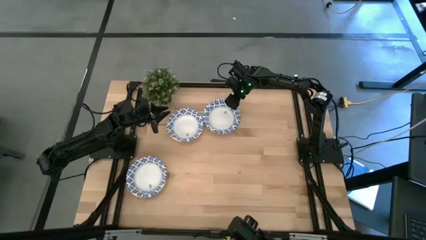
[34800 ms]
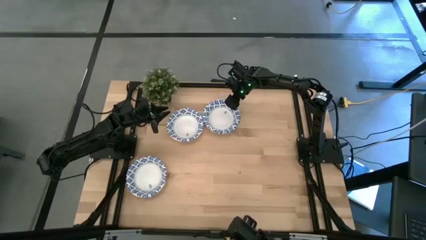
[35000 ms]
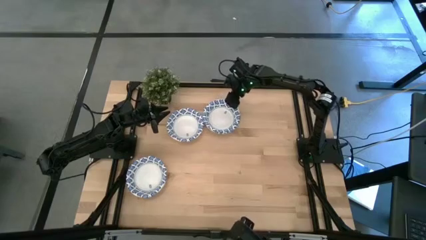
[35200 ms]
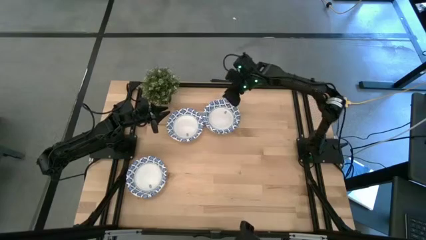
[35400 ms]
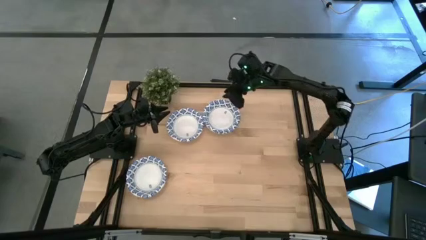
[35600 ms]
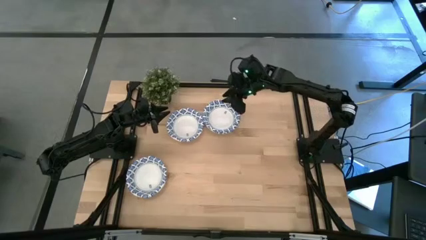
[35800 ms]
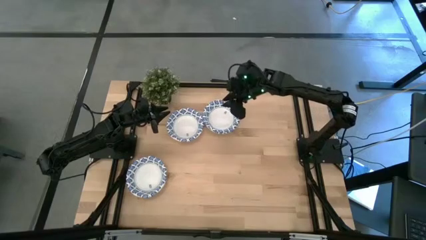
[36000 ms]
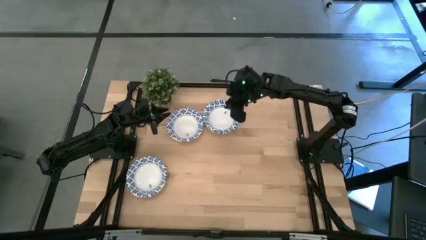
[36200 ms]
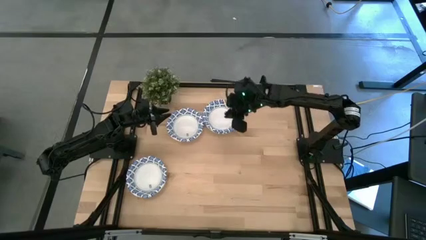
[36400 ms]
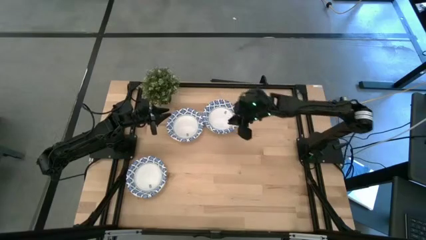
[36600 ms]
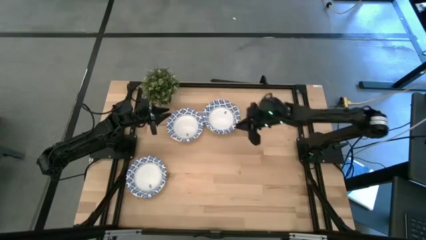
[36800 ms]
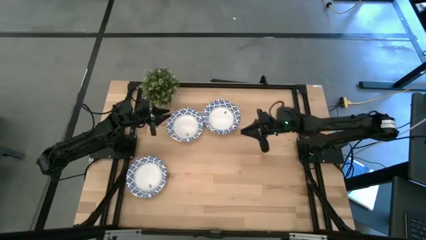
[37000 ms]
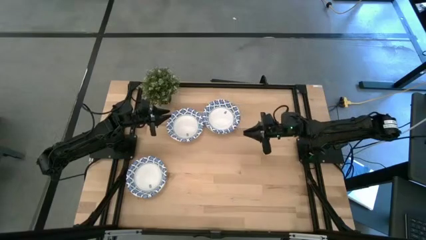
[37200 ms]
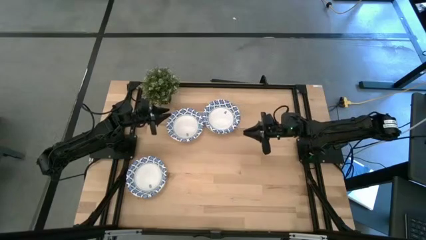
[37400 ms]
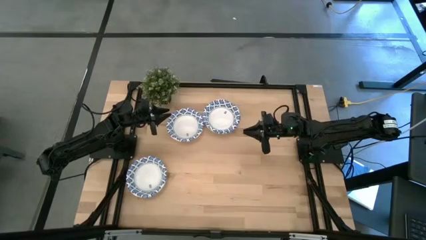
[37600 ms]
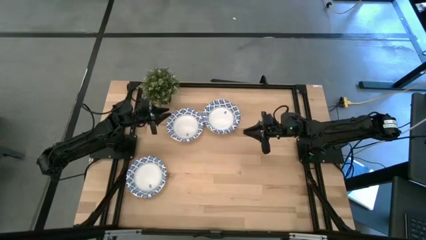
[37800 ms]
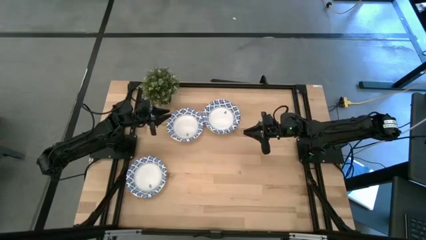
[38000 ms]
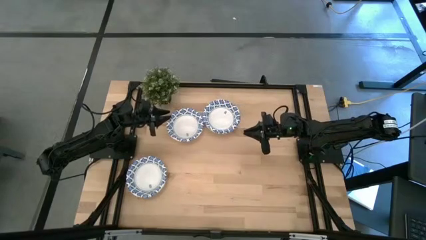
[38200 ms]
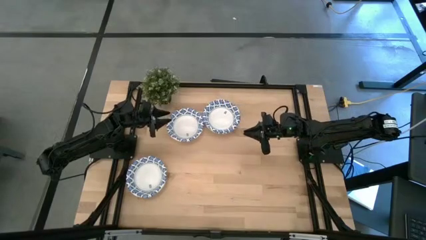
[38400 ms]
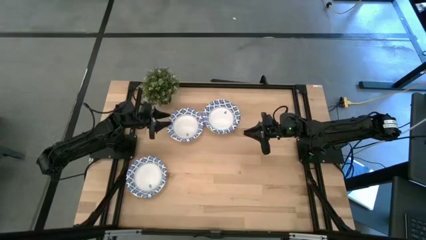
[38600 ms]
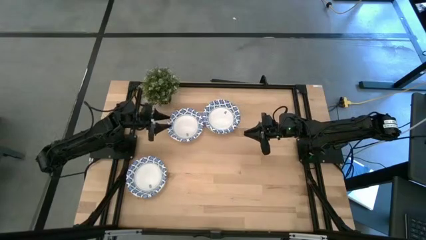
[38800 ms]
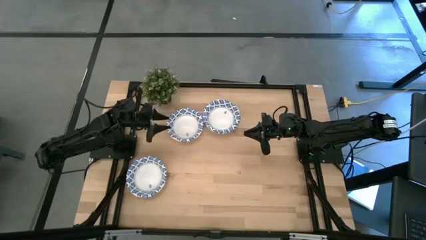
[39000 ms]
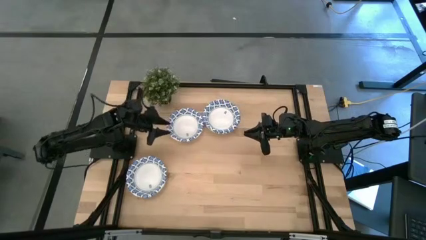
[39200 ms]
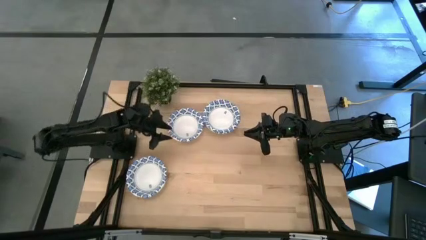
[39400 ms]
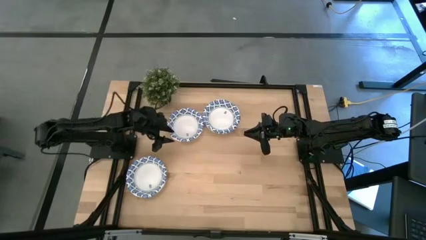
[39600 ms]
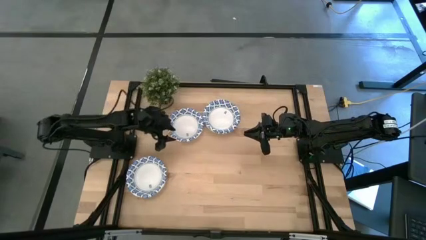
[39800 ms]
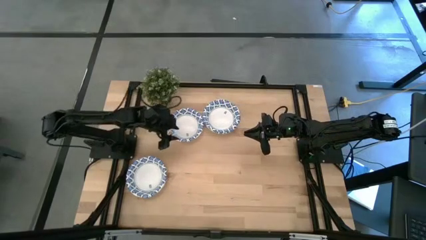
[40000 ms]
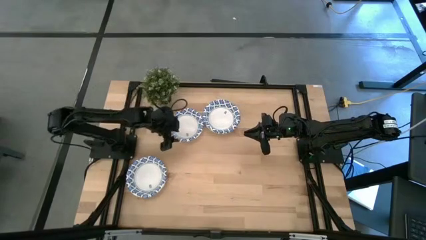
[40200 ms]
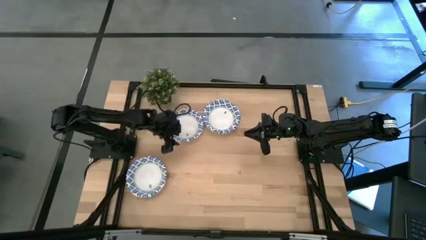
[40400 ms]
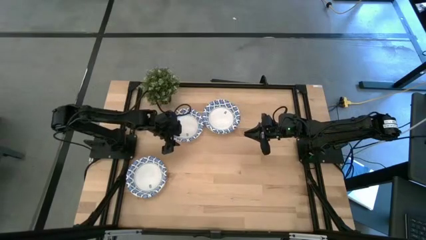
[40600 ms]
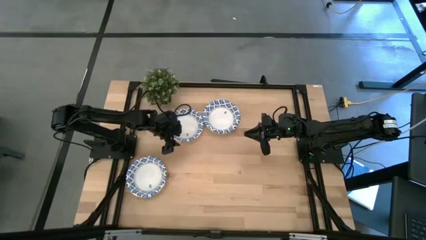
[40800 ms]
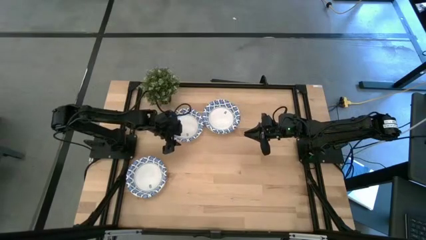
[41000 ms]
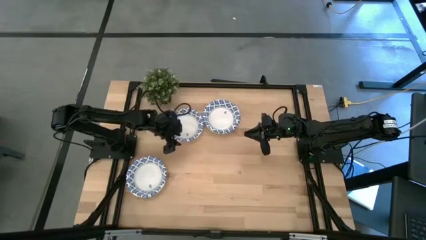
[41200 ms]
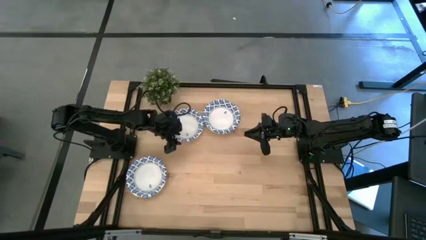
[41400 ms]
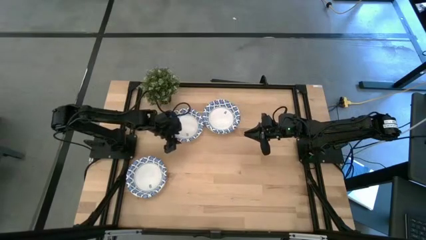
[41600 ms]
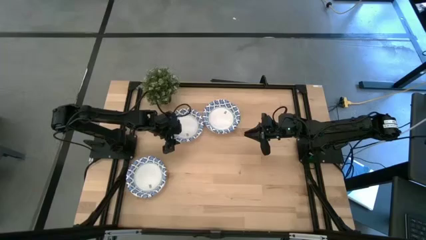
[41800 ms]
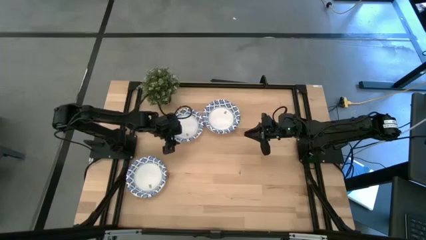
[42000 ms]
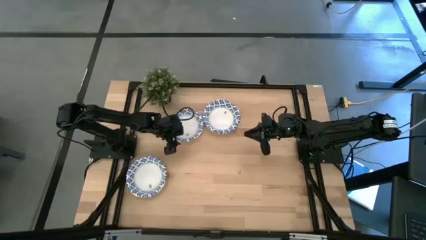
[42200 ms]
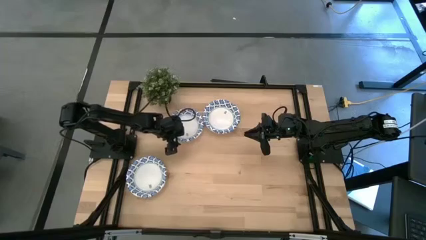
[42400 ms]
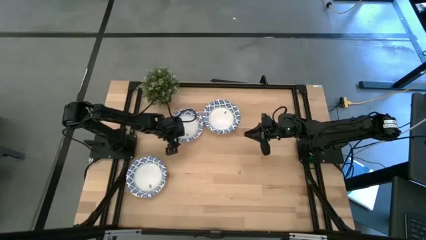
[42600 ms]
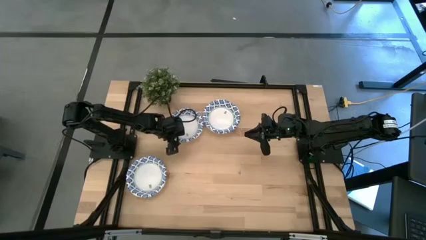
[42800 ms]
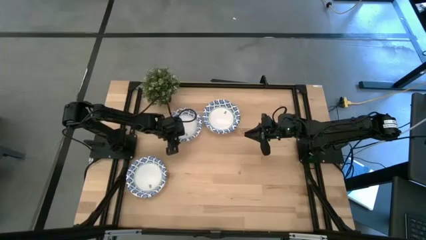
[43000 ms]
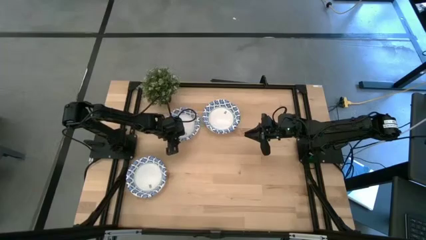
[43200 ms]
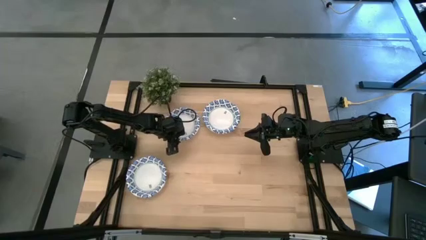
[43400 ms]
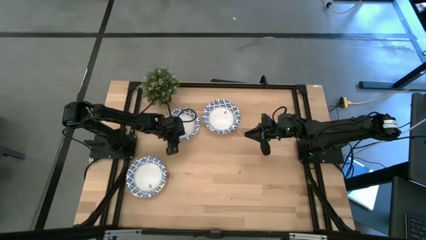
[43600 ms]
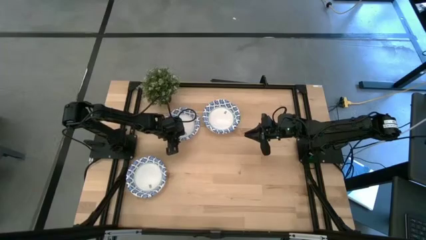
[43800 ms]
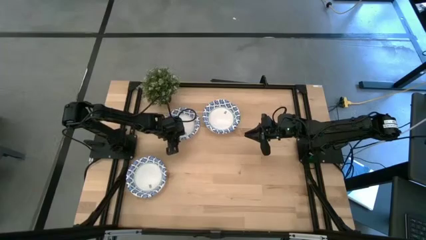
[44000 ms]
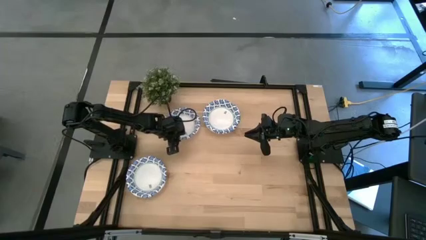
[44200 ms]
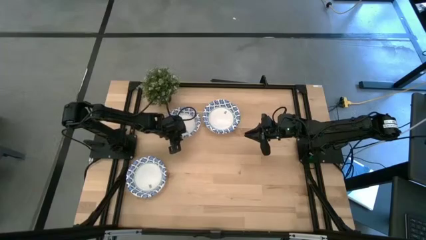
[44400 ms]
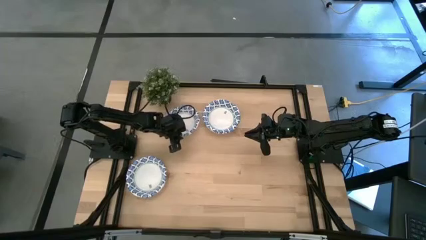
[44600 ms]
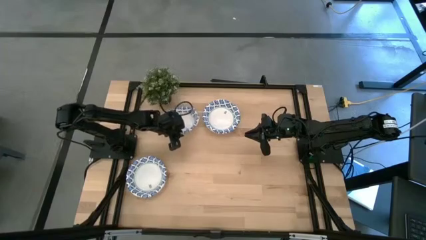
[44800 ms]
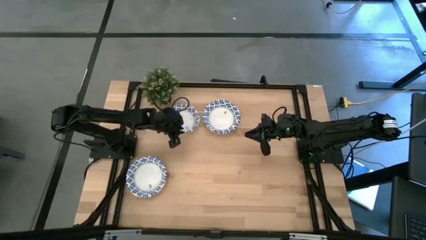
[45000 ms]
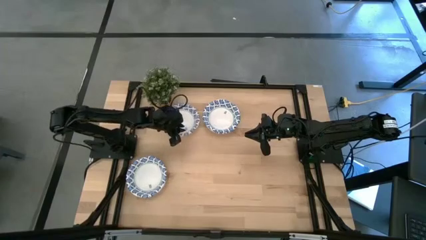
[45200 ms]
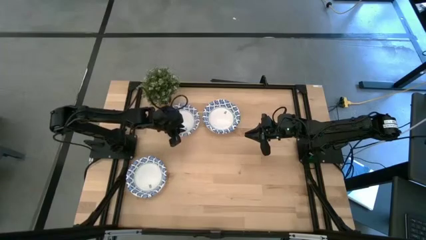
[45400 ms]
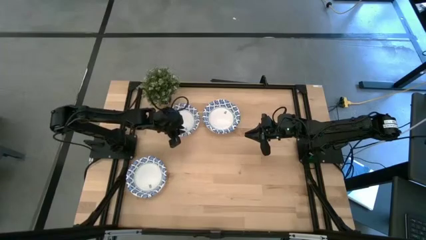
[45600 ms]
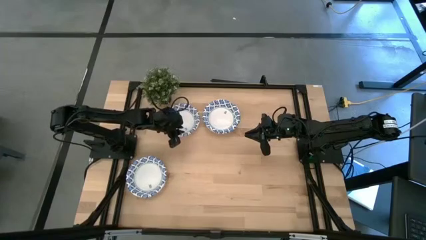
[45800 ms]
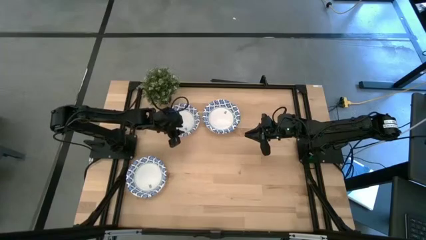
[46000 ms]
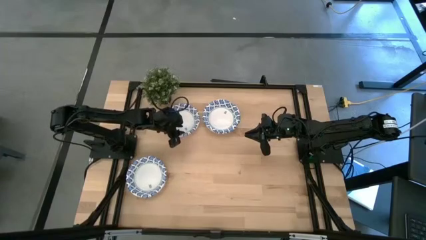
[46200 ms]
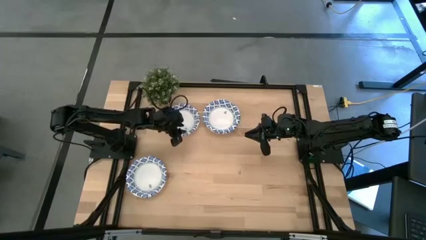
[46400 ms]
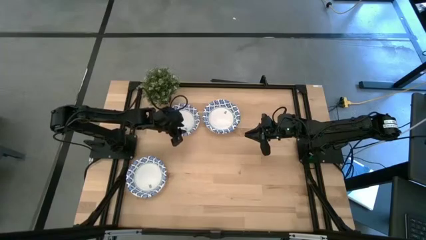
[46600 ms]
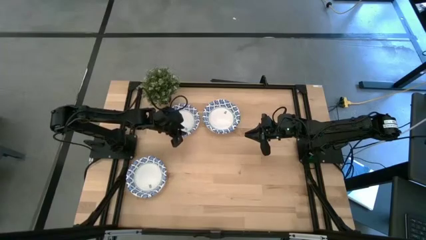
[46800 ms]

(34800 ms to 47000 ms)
Task: Nest bowls inside each other
Stack the white bowl on the other white bowl

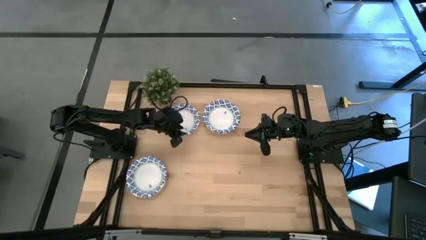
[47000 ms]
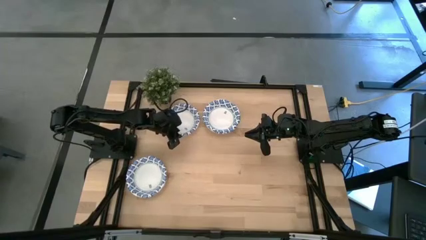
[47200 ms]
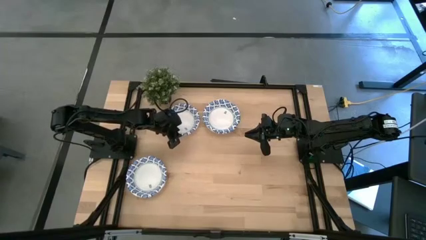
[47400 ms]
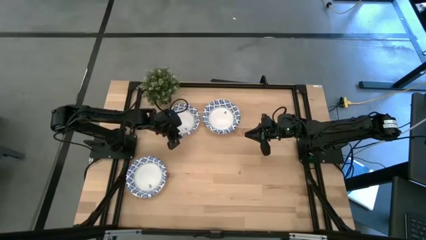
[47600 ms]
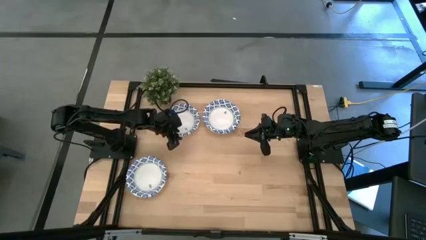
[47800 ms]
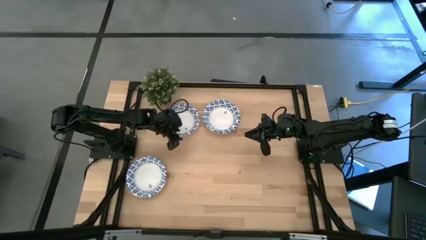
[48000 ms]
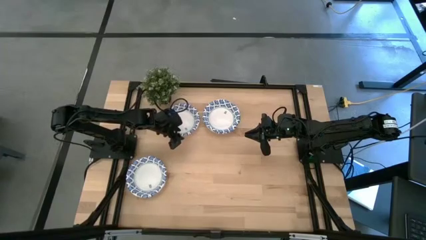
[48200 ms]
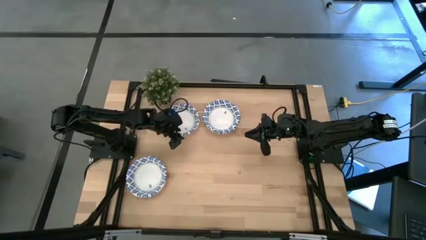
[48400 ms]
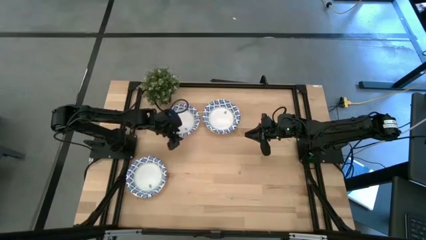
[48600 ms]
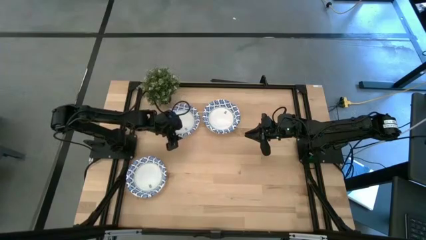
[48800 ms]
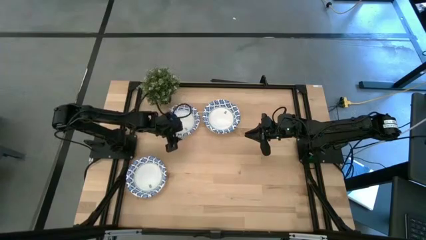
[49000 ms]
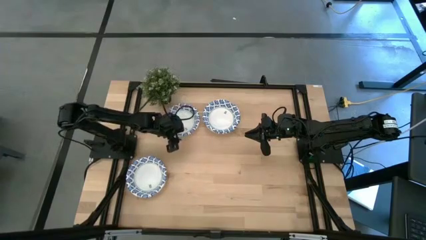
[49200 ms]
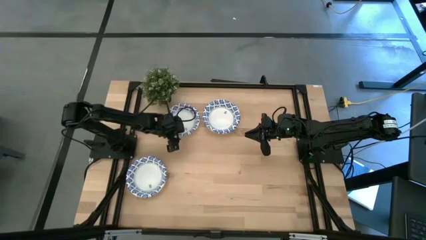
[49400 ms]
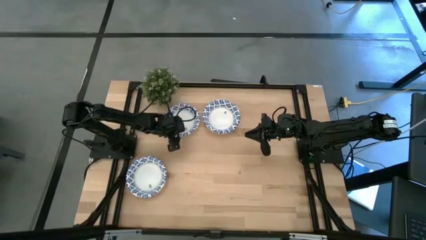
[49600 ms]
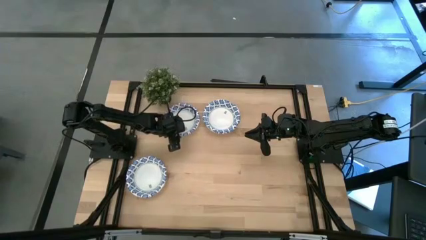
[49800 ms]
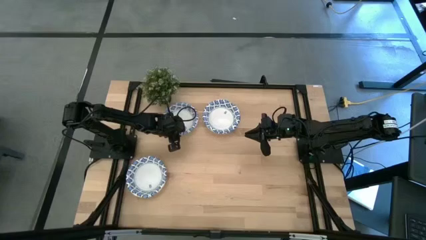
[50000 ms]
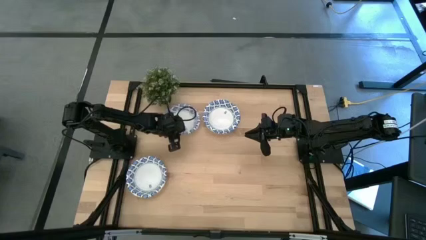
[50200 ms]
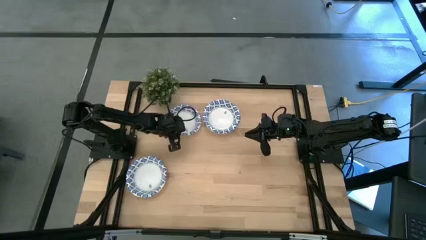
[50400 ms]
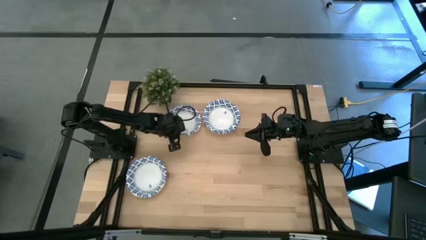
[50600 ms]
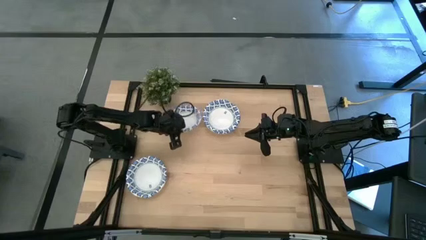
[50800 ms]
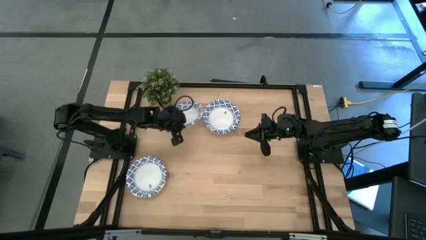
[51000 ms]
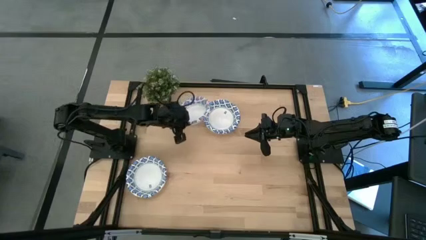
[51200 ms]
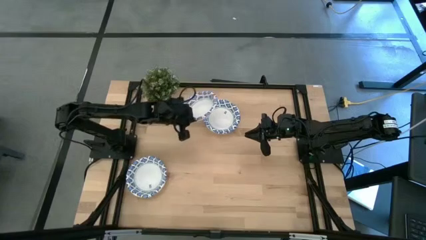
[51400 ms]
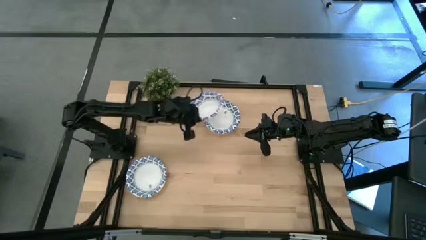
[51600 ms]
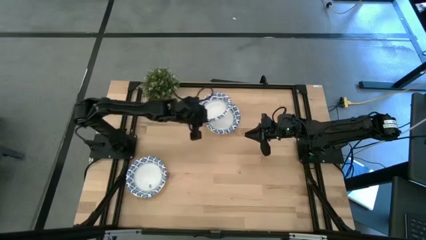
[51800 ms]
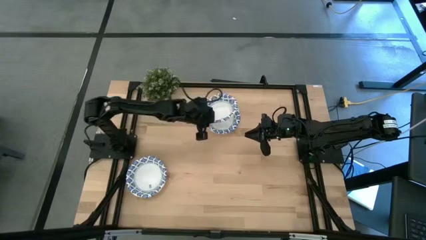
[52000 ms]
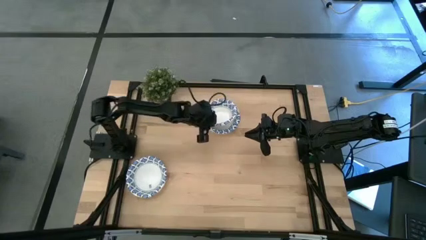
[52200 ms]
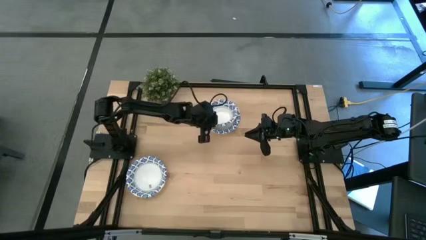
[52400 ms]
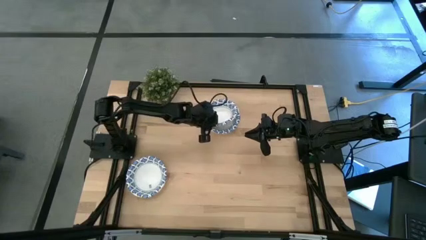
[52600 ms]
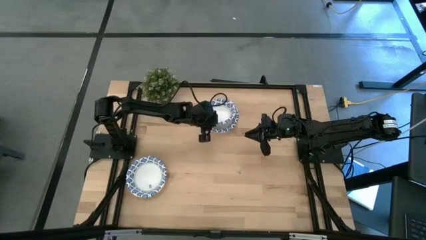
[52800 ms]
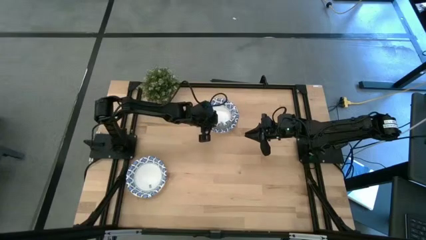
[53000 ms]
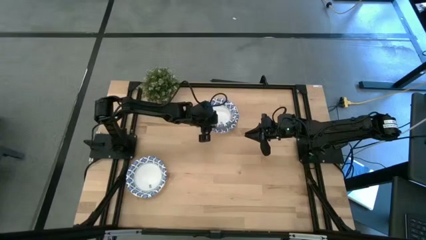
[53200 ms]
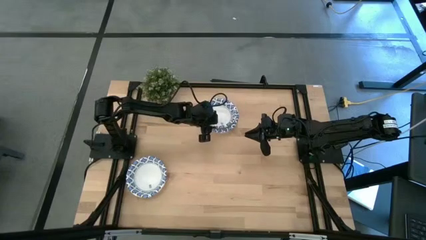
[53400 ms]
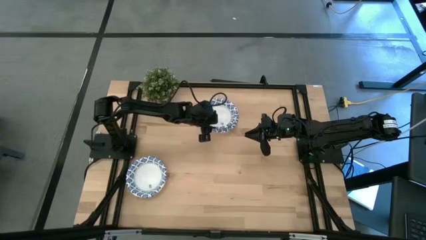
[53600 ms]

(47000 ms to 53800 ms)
Stack the white bowl on the other white bowl
